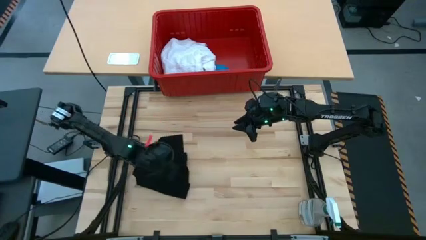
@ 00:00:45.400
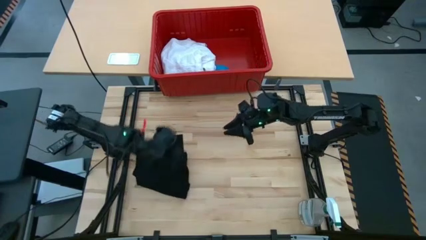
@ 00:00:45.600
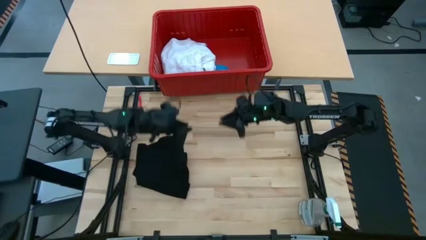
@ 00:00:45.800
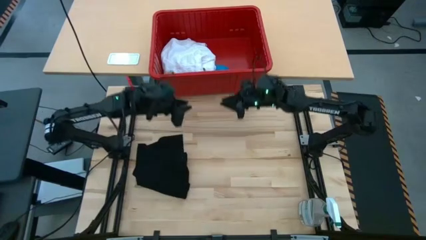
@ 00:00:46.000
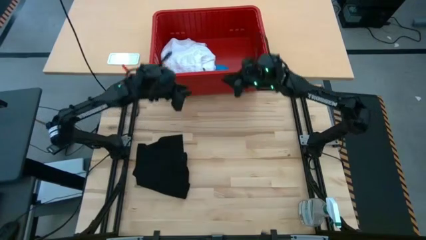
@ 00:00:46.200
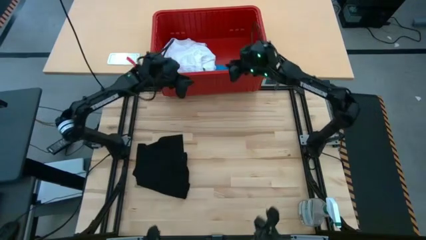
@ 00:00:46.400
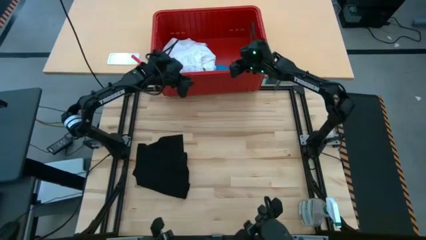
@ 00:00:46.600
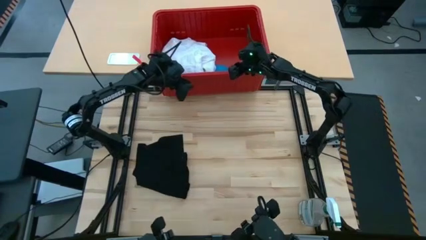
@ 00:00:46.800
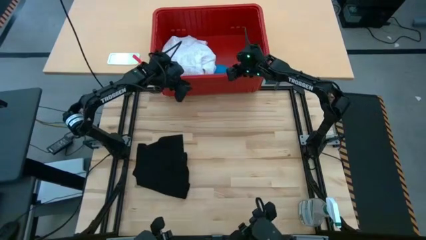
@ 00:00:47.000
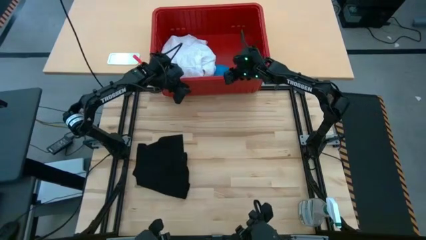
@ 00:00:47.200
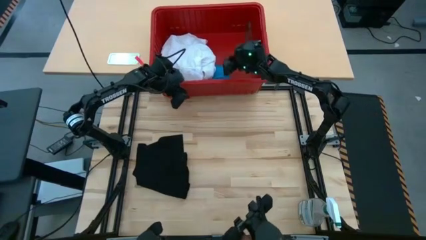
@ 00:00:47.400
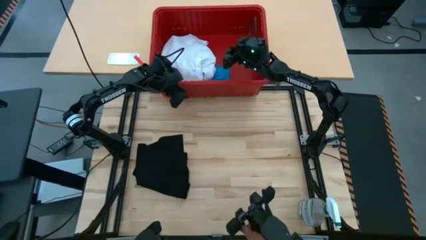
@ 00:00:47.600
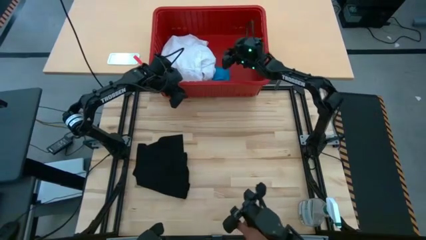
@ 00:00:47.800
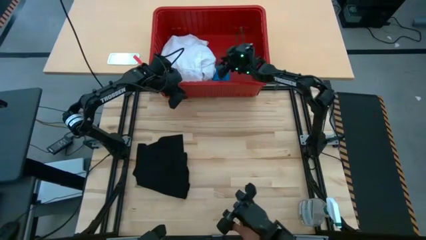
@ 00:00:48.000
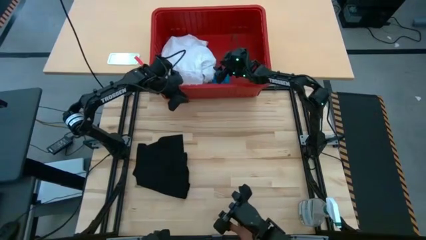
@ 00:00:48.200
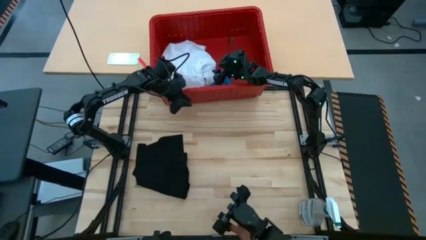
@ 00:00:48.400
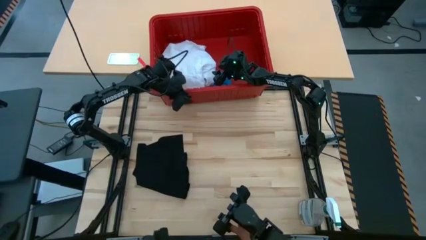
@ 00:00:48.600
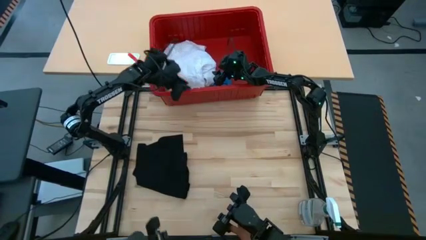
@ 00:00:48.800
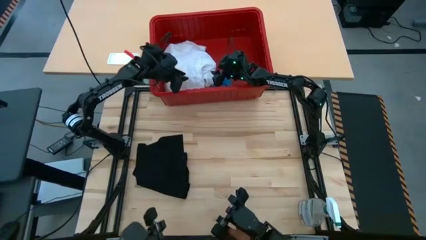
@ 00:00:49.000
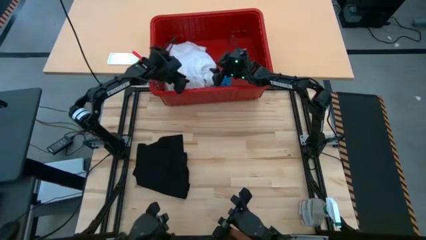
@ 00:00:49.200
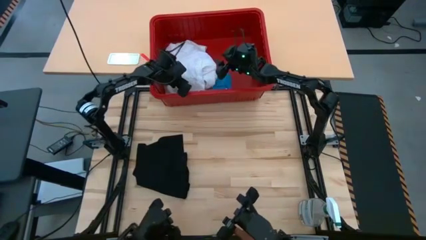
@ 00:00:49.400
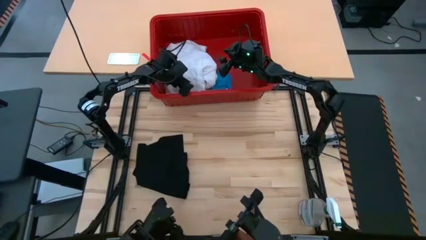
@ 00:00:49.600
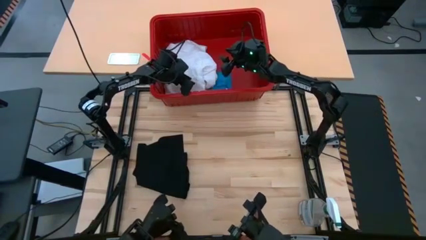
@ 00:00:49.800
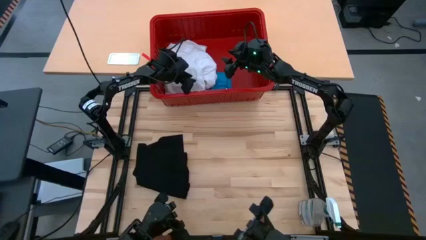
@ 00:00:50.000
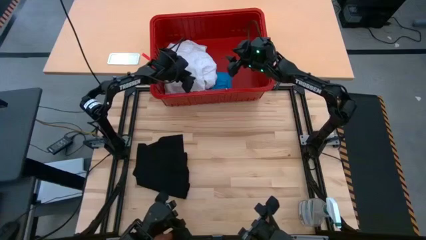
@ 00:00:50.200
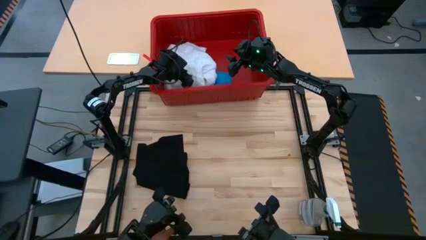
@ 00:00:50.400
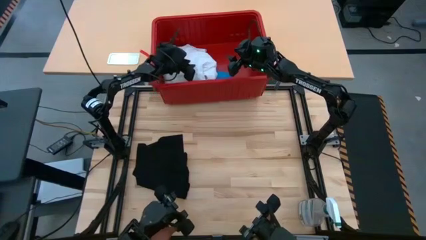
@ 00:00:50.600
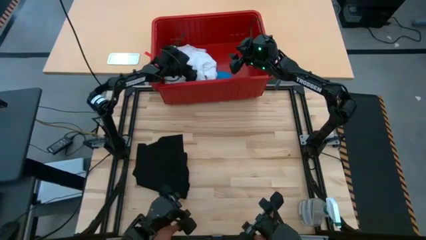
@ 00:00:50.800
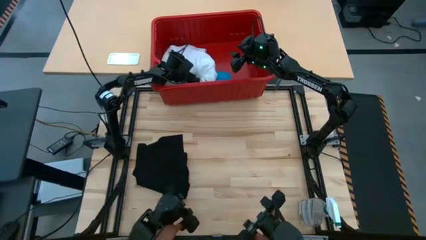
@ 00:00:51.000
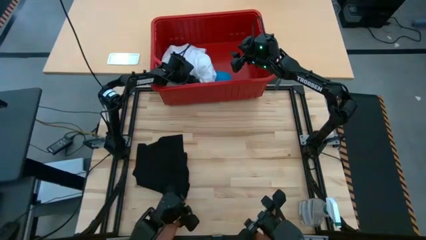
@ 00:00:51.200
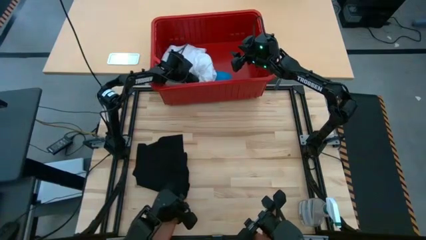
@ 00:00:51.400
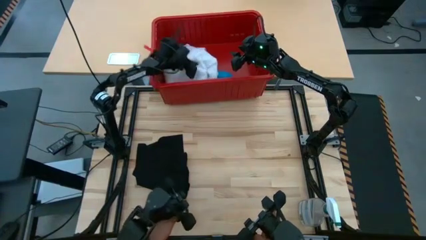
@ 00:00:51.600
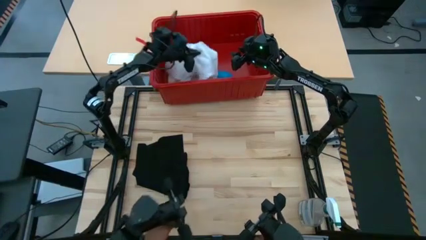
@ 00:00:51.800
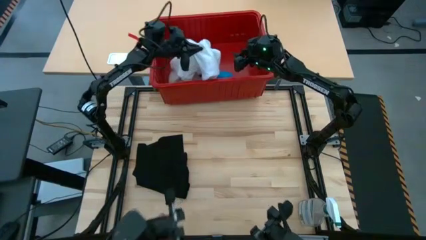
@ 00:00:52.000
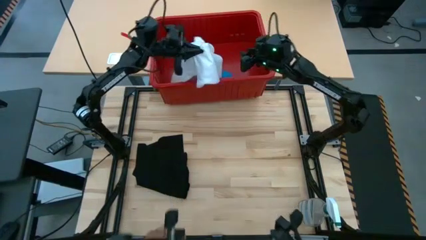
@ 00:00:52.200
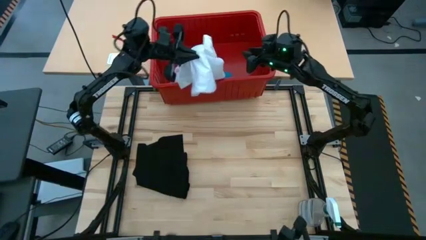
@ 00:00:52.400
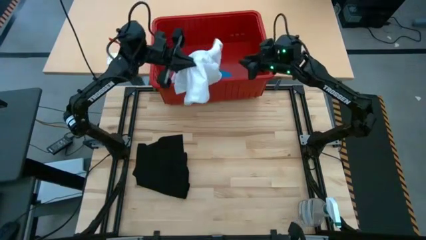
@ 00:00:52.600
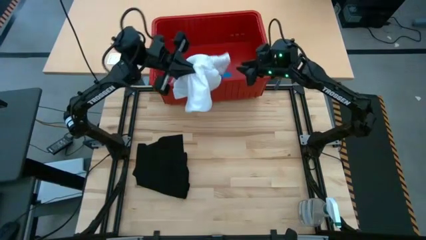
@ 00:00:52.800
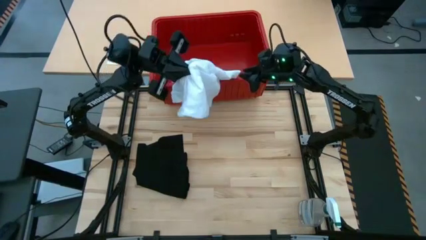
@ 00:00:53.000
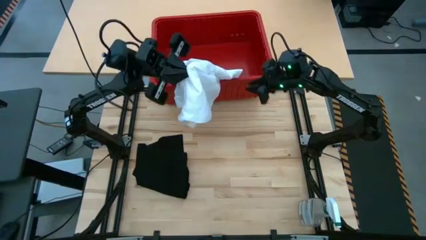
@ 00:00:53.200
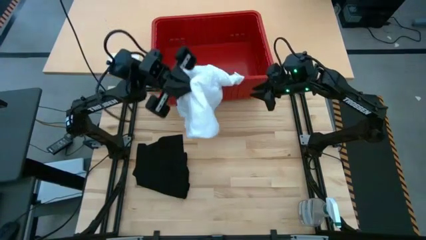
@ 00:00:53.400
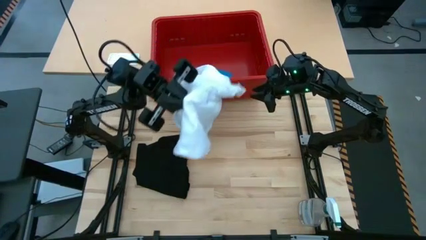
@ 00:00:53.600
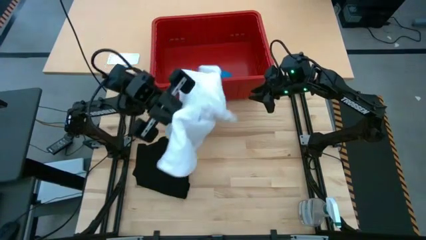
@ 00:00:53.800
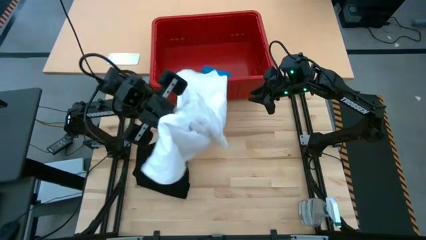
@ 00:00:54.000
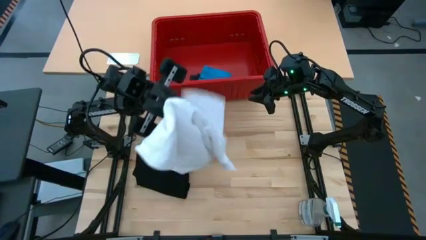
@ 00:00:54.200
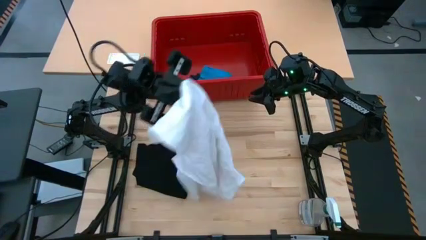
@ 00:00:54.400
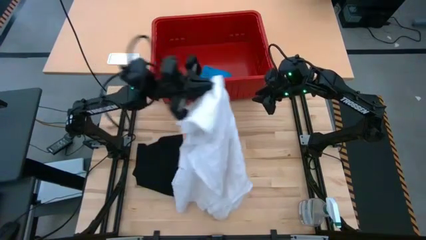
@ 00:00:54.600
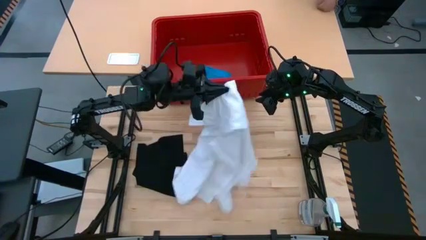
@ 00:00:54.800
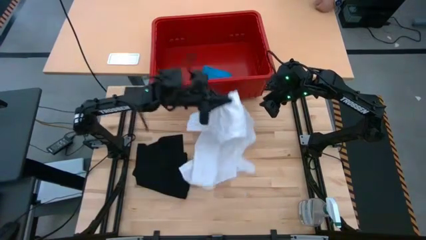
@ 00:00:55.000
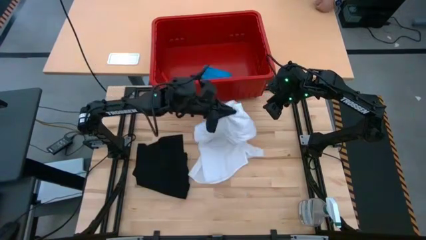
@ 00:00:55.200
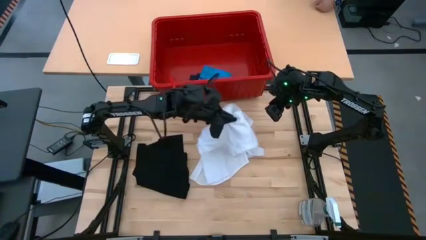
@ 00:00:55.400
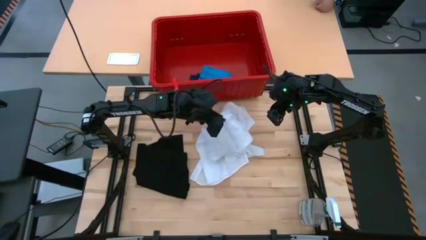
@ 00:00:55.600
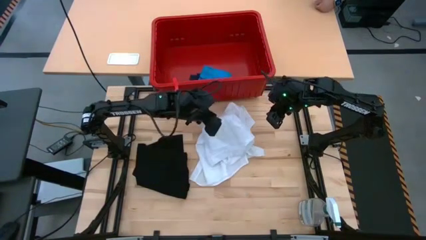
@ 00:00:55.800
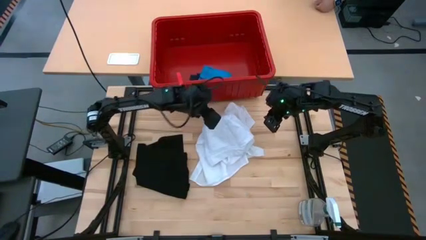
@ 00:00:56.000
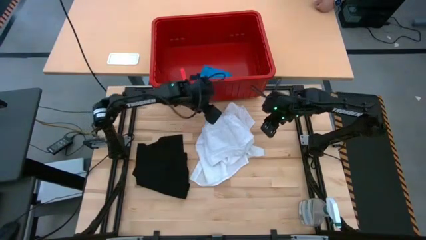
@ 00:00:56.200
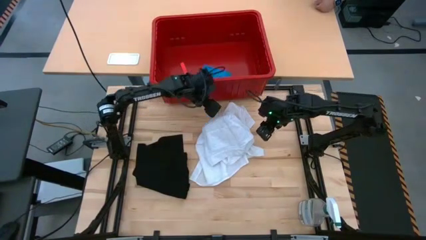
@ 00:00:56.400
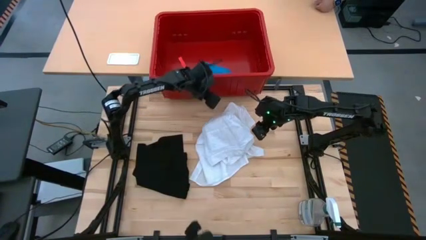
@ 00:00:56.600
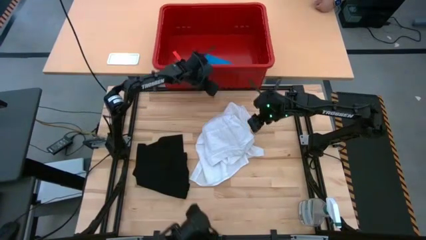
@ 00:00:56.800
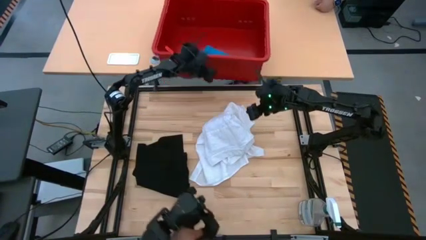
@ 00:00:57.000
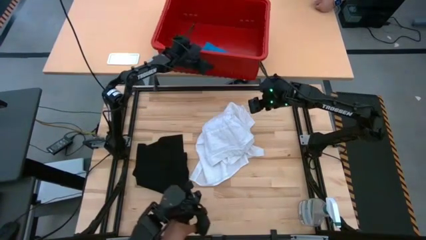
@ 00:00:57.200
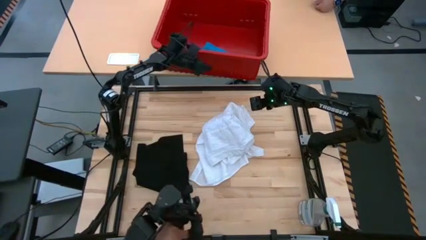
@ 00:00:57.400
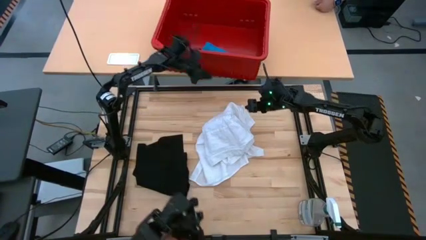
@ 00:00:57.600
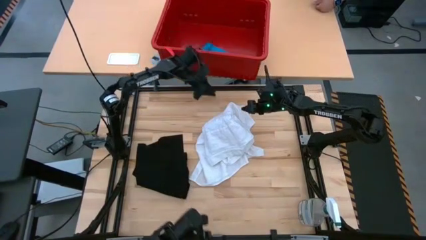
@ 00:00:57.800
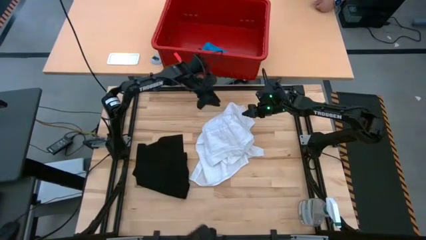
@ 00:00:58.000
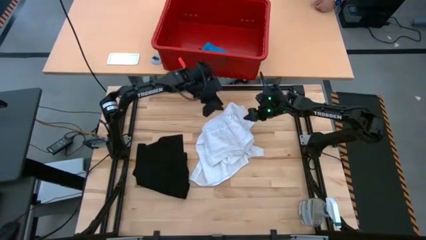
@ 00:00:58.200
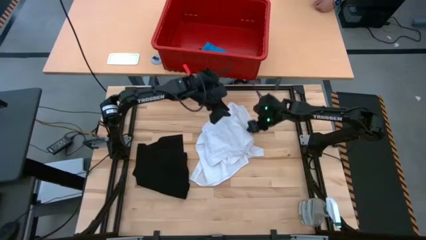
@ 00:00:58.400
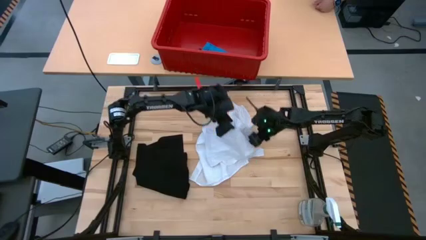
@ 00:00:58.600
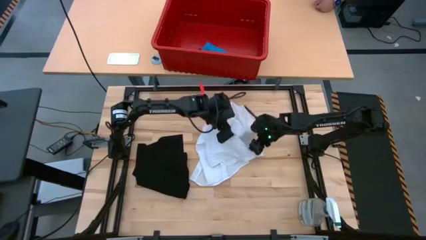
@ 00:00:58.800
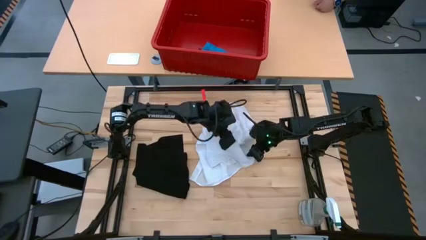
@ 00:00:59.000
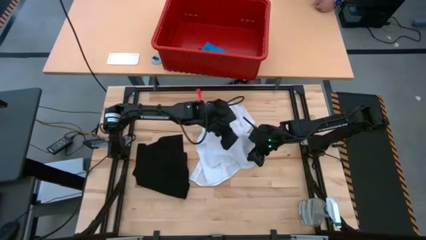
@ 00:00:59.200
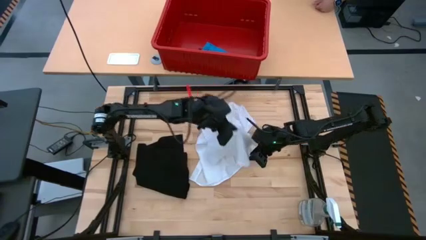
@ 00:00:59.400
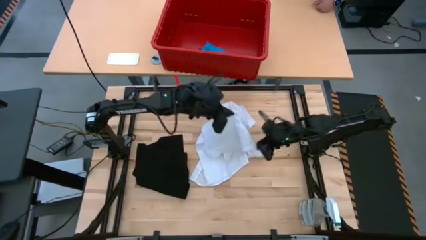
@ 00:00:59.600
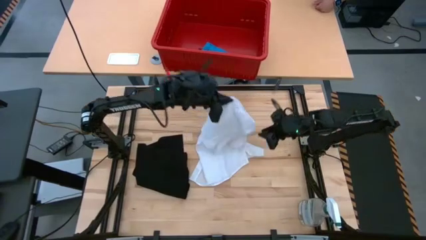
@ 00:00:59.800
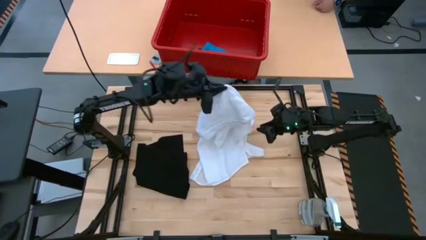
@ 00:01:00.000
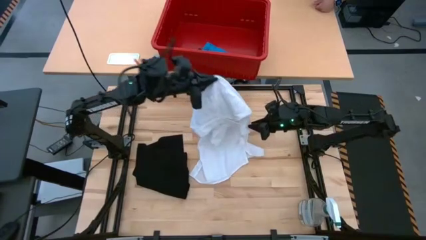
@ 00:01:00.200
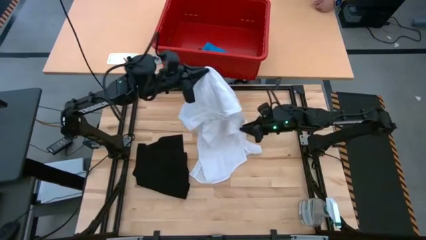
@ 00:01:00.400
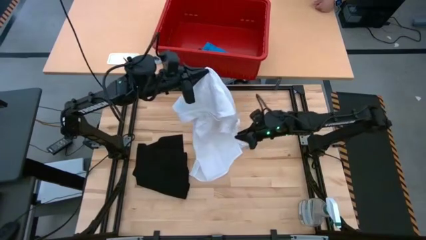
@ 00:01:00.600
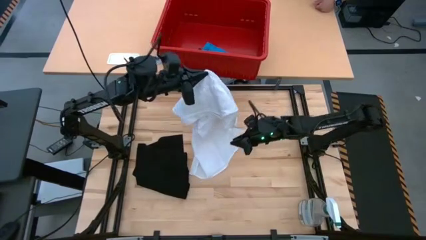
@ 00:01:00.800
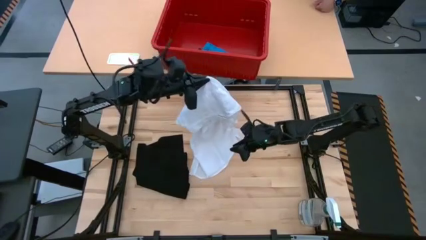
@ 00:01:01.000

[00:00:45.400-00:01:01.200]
Task: Fold laundry
Fold the white shirt

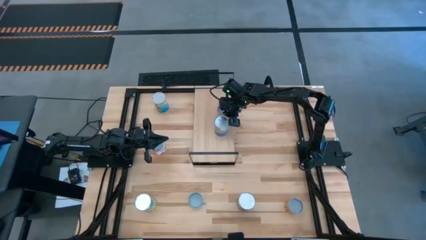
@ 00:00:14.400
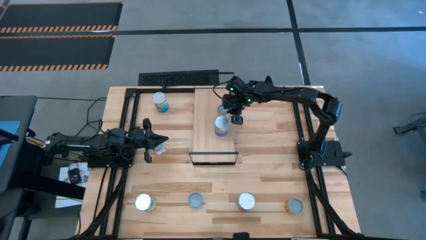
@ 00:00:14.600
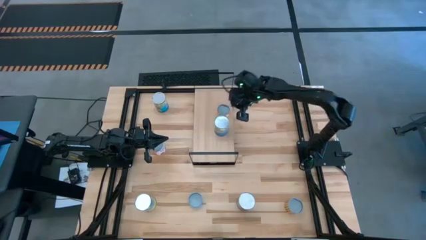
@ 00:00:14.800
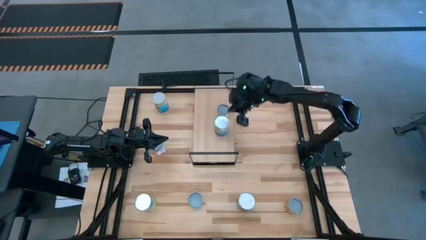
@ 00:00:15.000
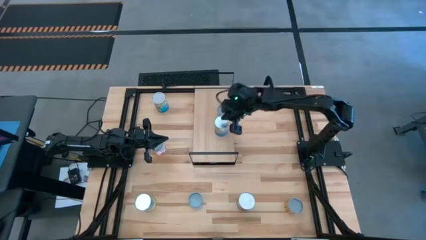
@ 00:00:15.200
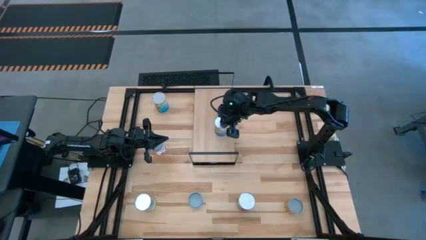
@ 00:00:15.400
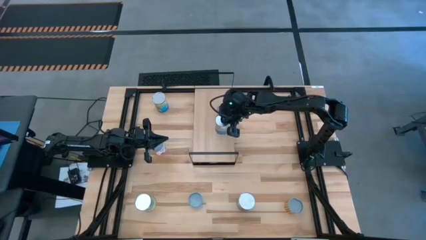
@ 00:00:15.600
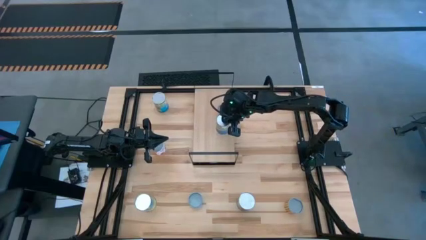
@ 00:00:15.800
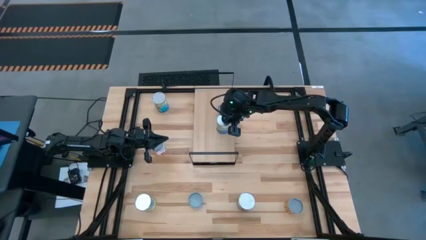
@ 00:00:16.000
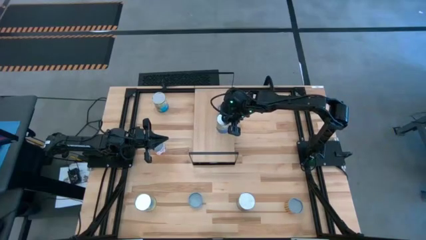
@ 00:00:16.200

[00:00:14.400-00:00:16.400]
Task: Pick and place cans onto a shelf
Adjust the canned peas on the shelf
